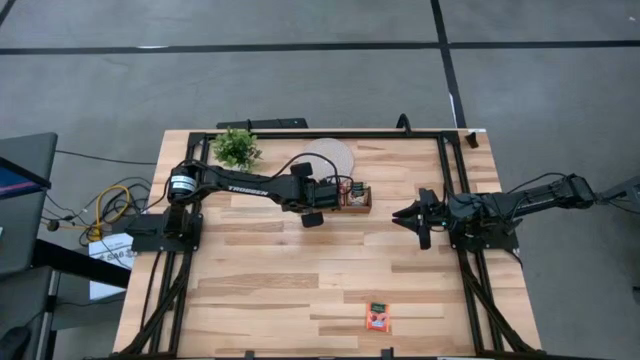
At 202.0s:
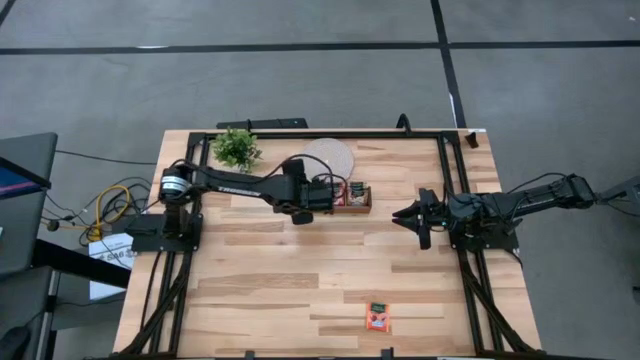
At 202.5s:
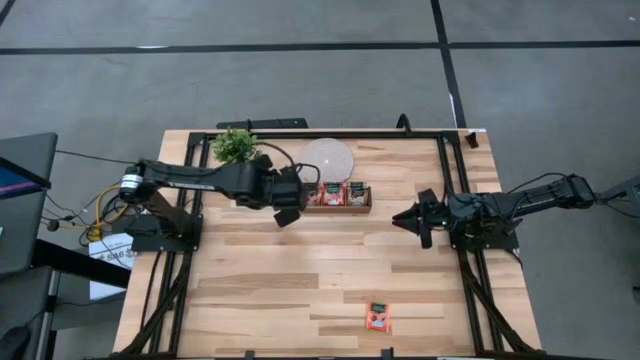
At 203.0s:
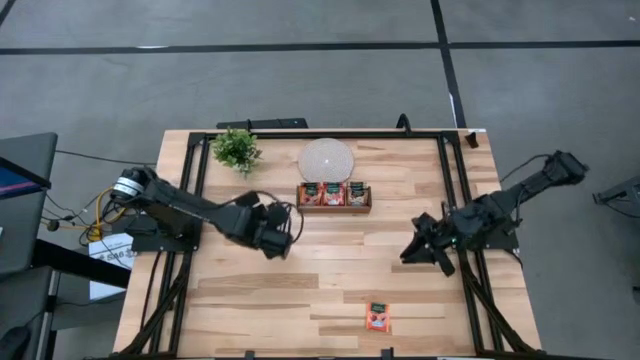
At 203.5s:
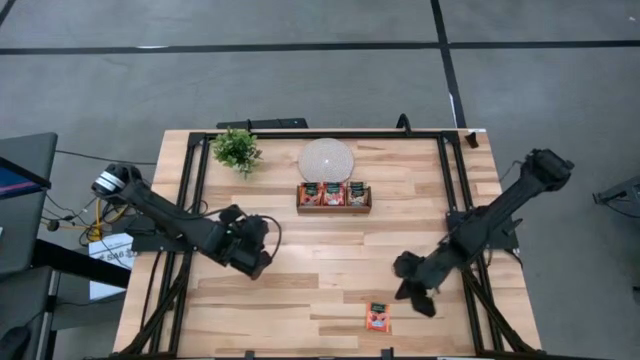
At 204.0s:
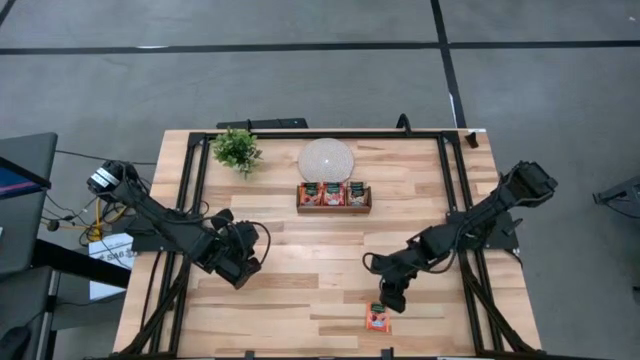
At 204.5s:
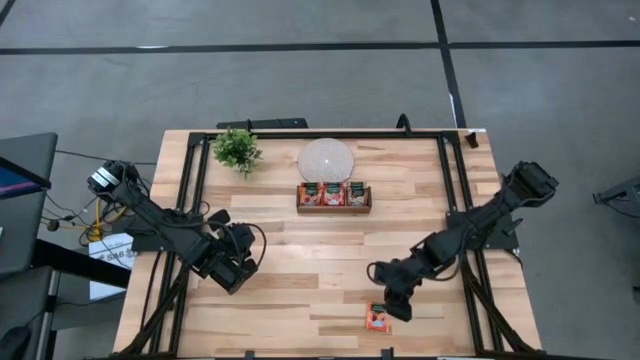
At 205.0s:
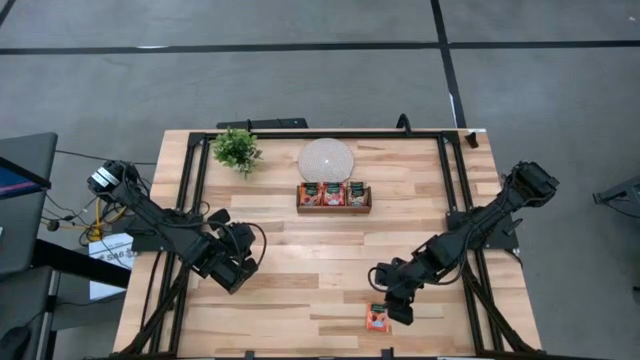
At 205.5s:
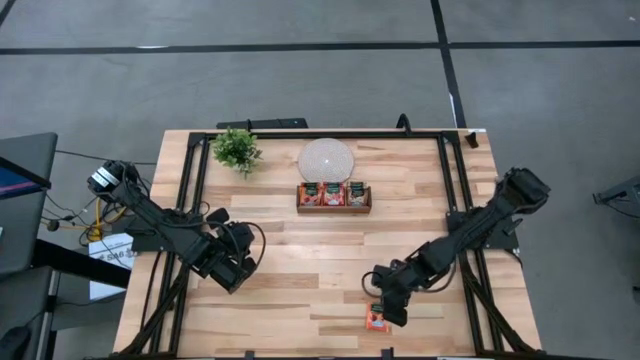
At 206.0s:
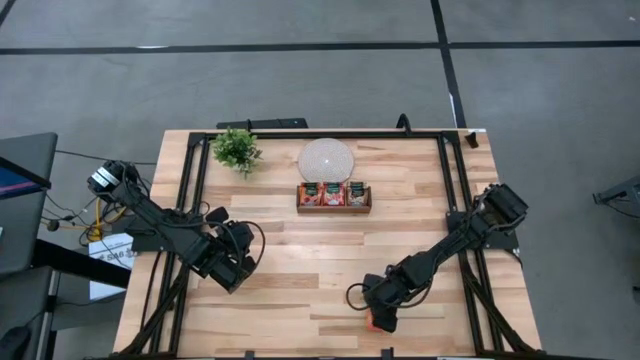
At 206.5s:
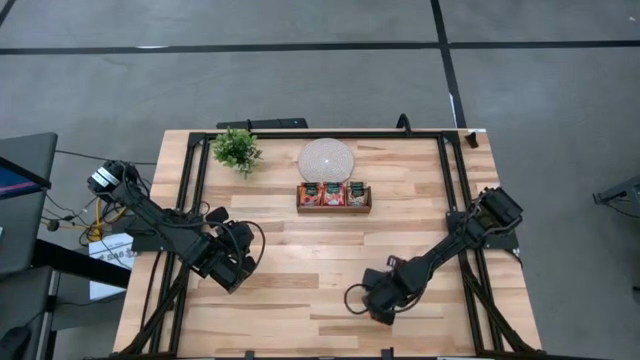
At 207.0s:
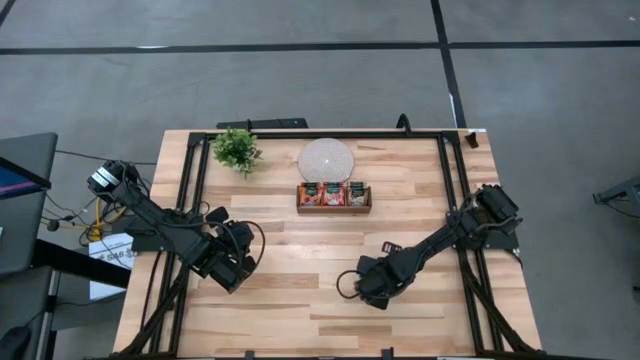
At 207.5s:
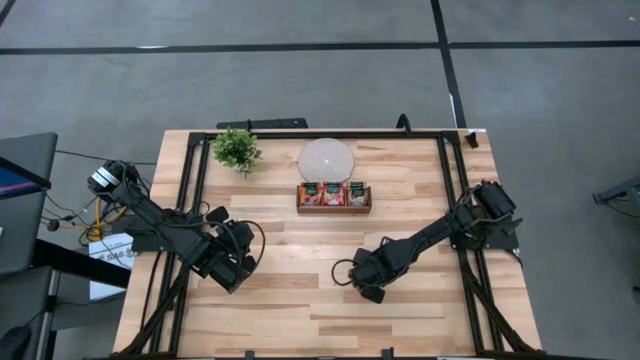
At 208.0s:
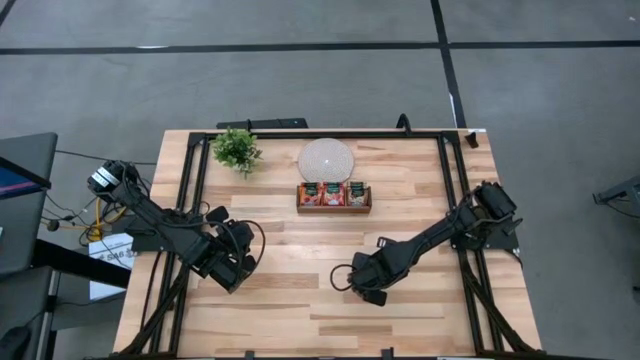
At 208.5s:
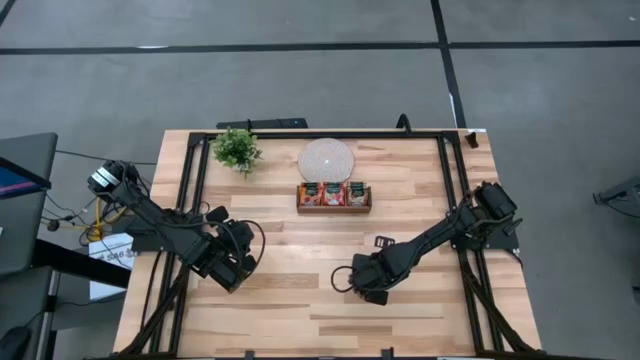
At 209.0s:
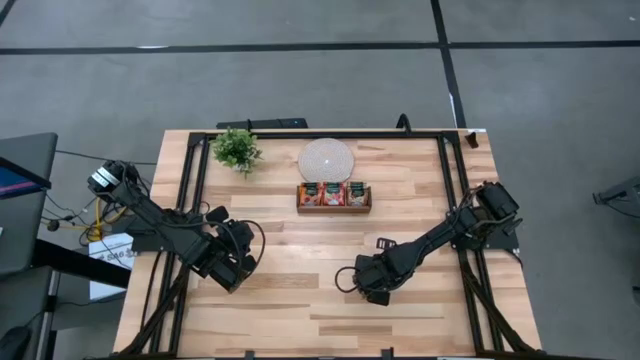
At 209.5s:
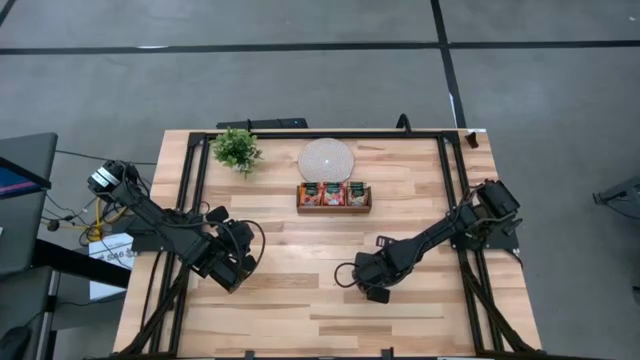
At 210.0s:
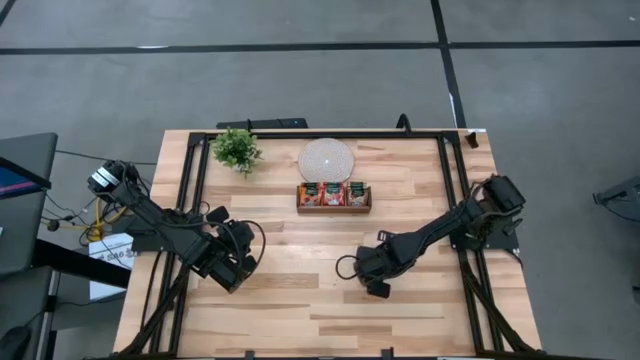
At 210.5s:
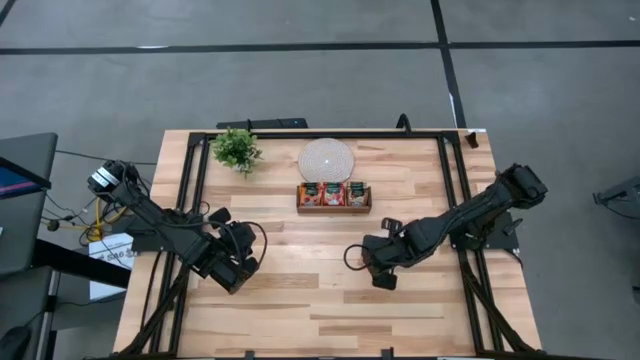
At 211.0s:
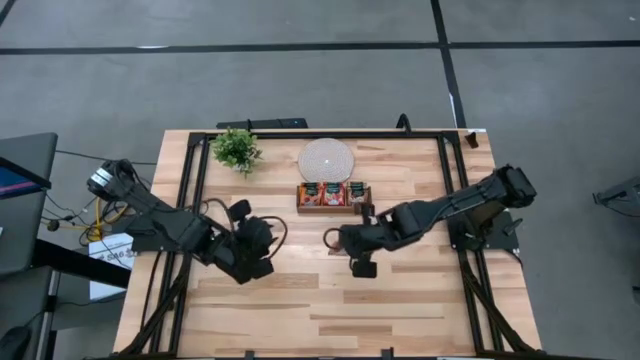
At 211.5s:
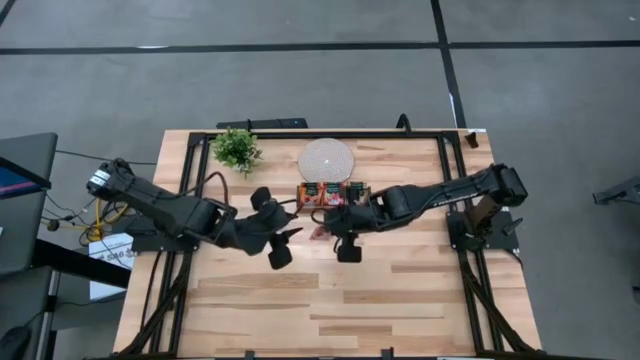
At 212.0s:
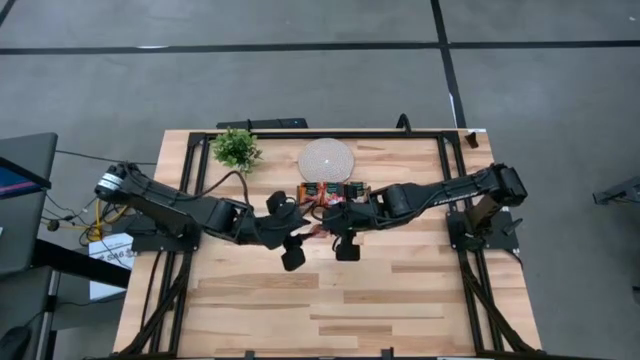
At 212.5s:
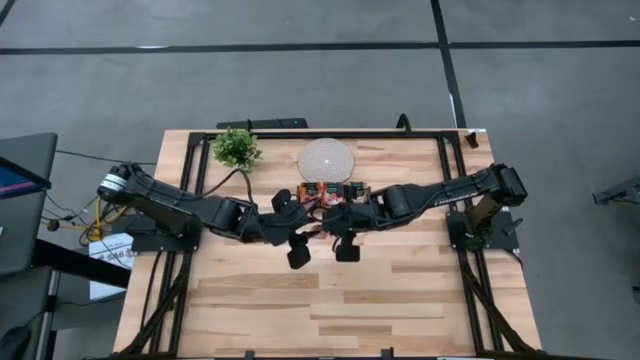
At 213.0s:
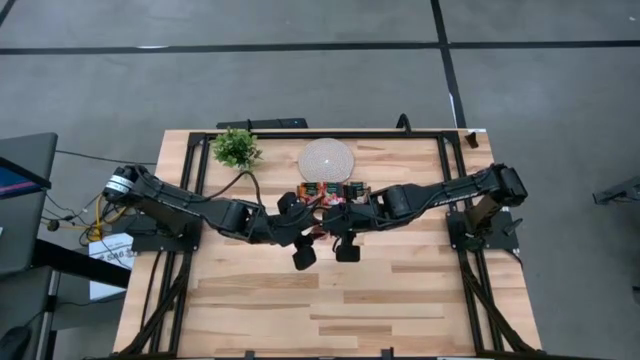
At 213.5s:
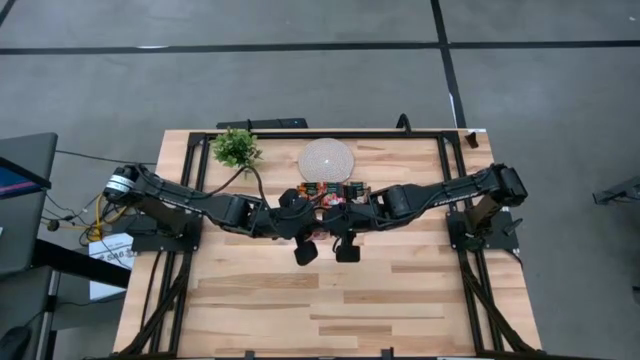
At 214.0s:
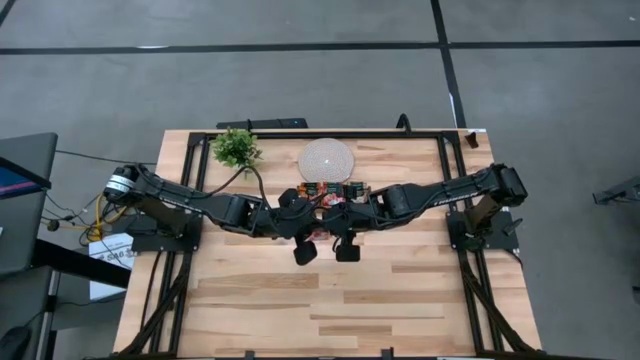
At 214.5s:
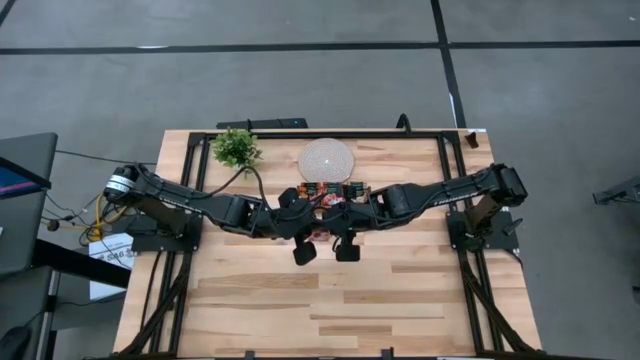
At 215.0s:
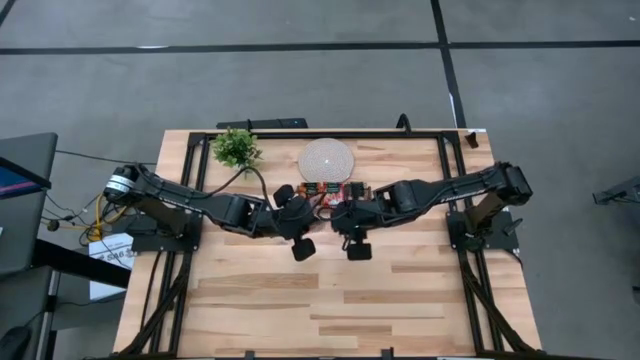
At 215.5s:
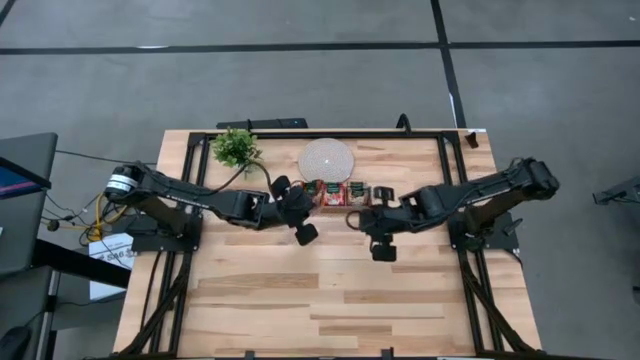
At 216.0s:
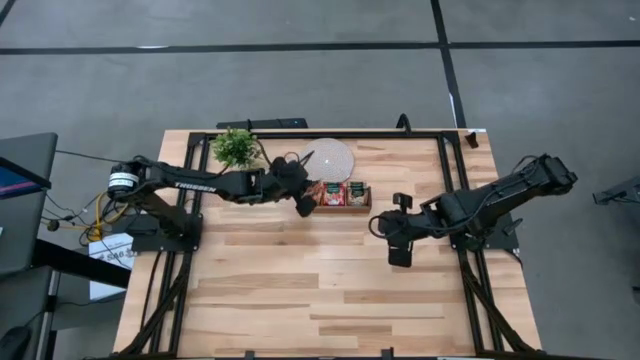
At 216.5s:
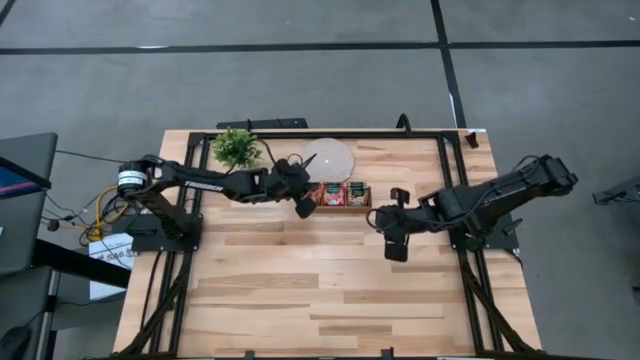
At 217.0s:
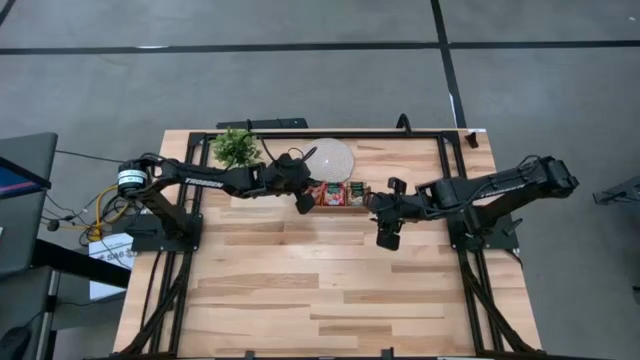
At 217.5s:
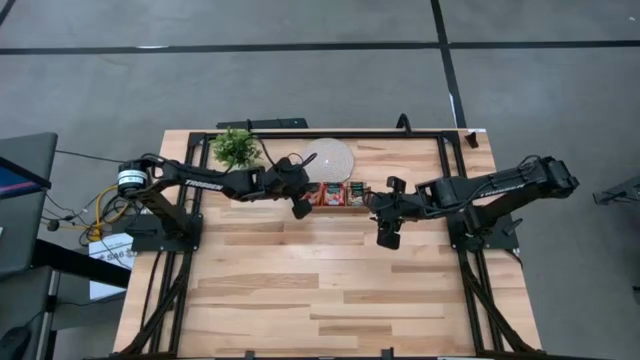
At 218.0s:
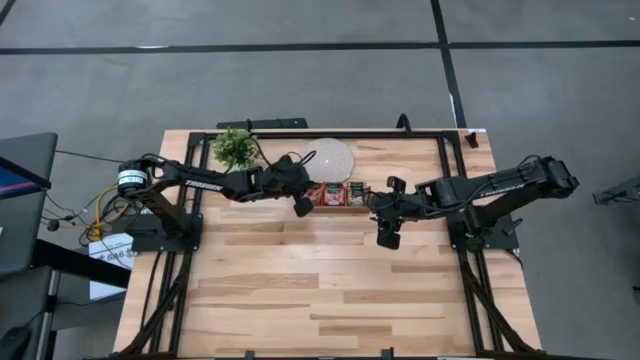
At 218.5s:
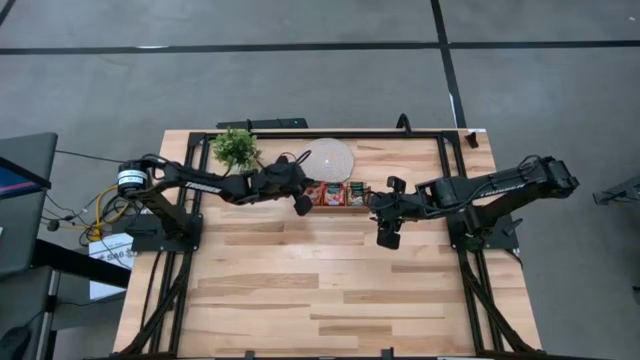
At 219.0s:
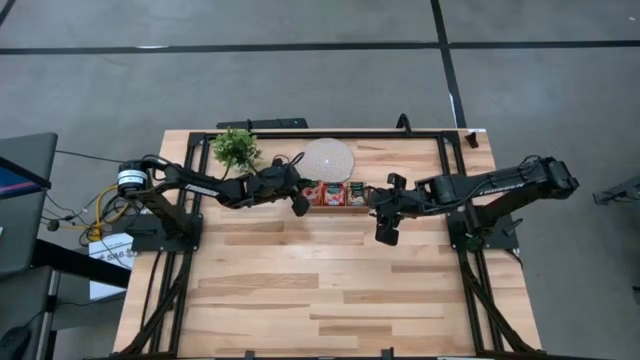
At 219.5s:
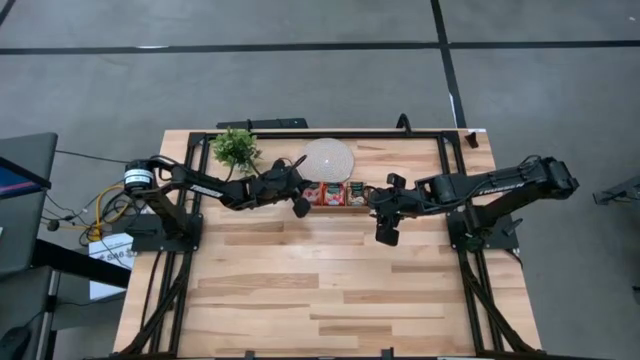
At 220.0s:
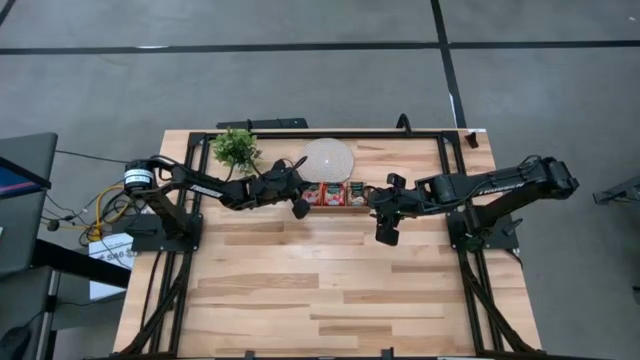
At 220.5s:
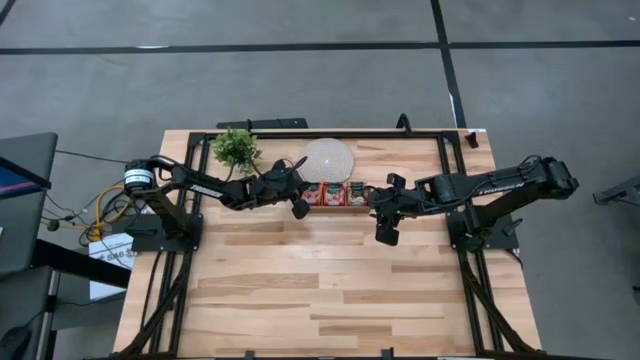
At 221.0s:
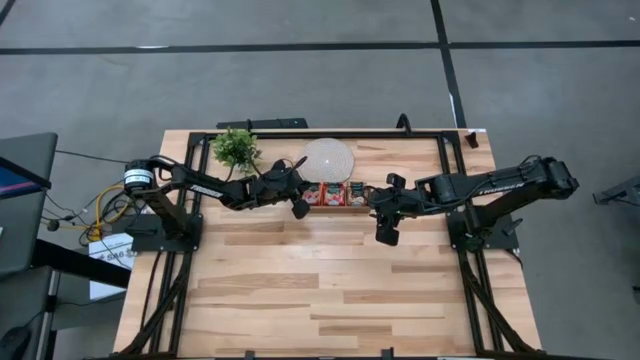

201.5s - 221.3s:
Task: Pick & Place Tea
Put the orange tea bag into the left section of the wooden organizer

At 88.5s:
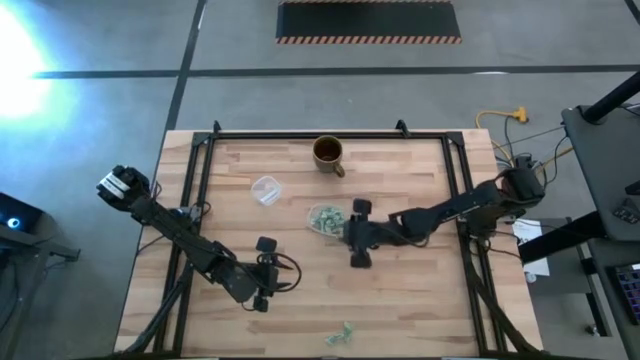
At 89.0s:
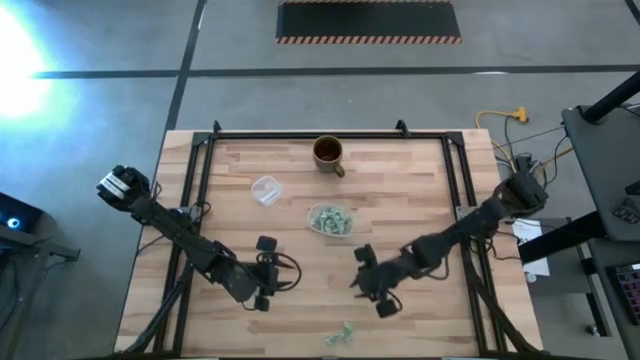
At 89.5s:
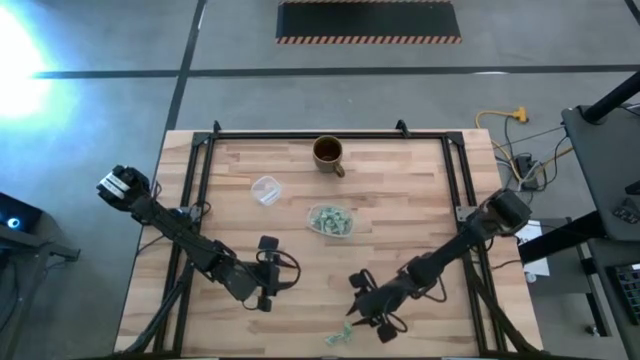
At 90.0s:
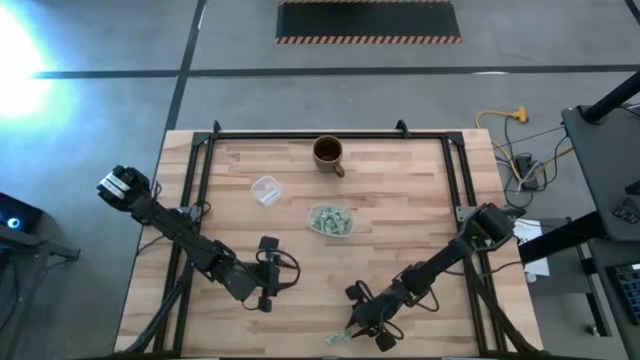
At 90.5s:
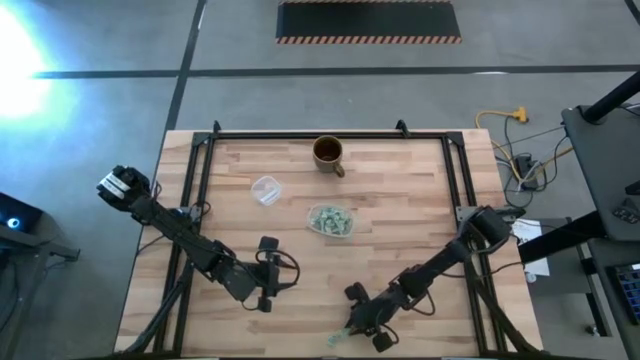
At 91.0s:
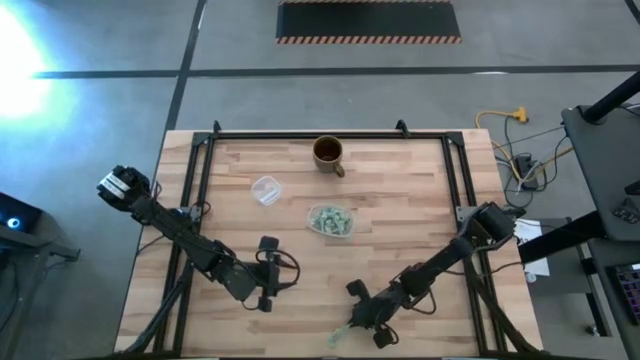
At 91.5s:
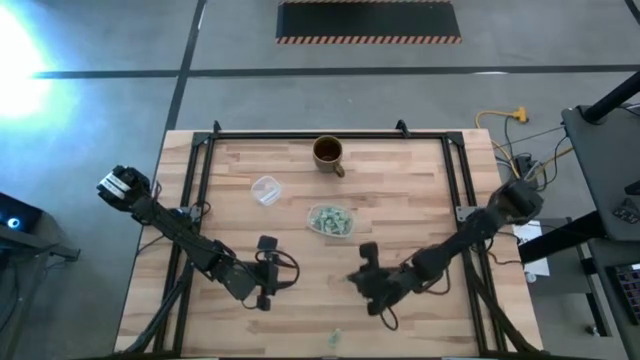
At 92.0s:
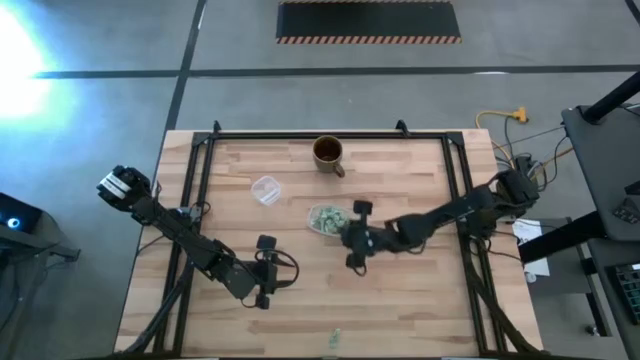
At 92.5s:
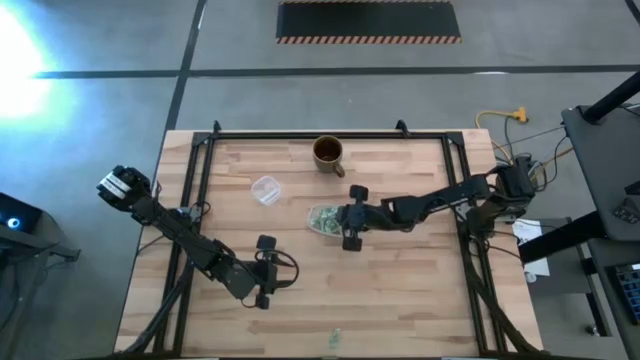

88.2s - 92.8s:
Task: Pick and place Stevia / Truvia into bins
Put the green stevia packet into the transparent container
